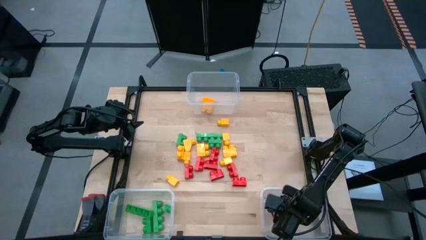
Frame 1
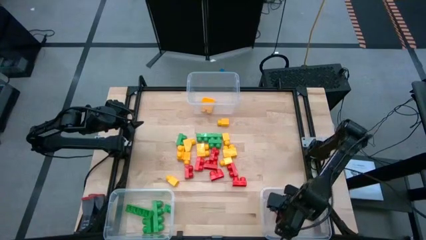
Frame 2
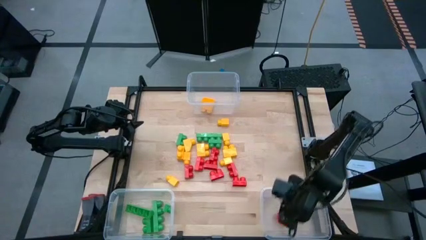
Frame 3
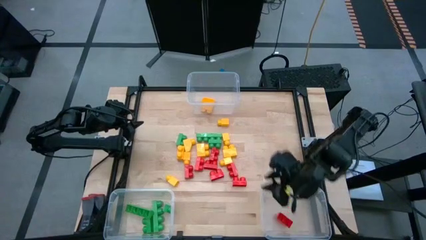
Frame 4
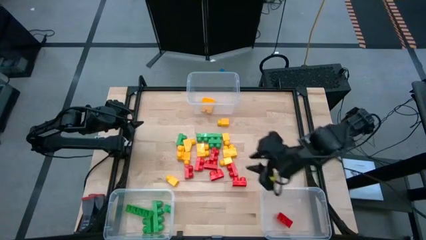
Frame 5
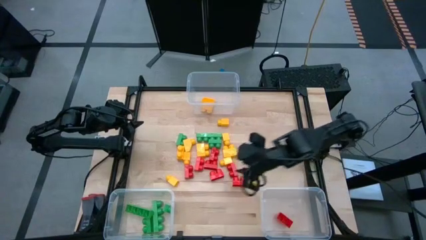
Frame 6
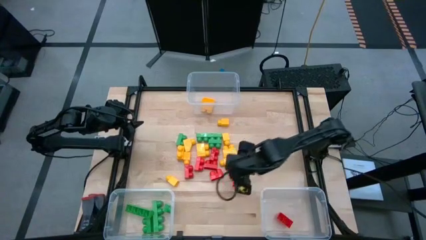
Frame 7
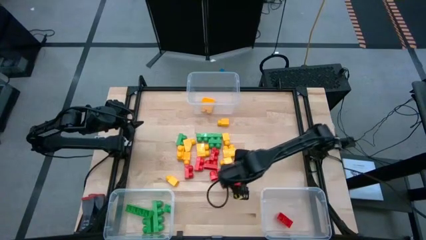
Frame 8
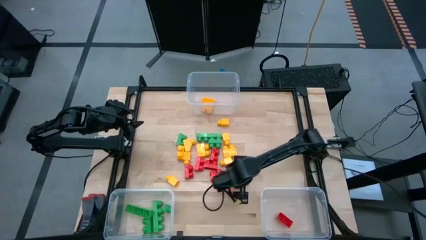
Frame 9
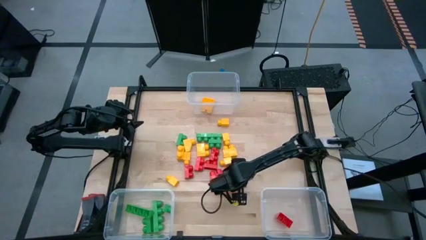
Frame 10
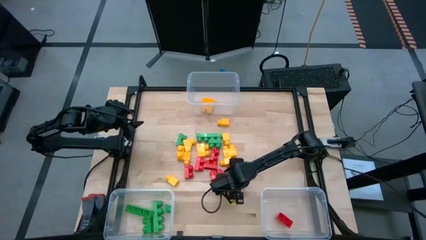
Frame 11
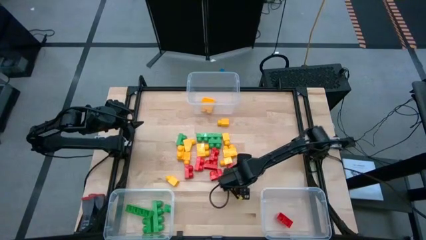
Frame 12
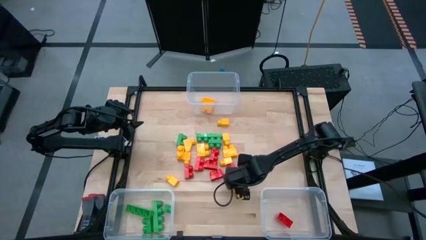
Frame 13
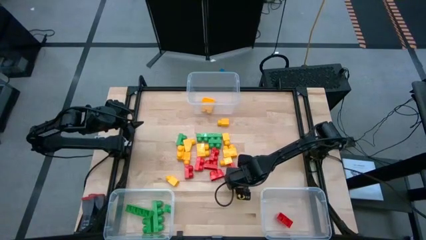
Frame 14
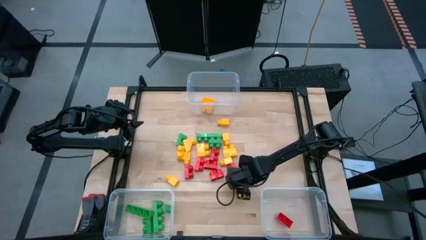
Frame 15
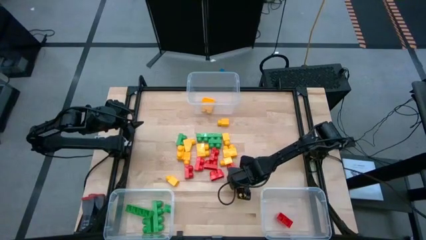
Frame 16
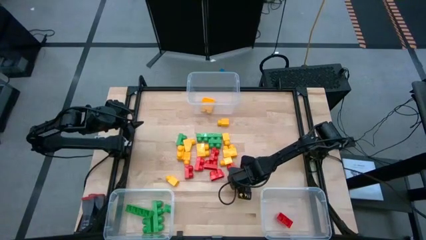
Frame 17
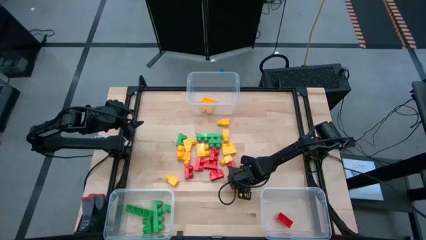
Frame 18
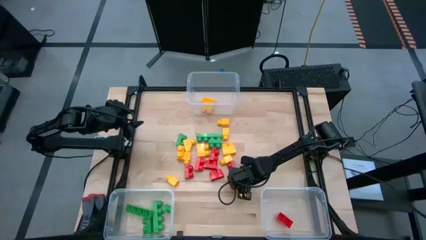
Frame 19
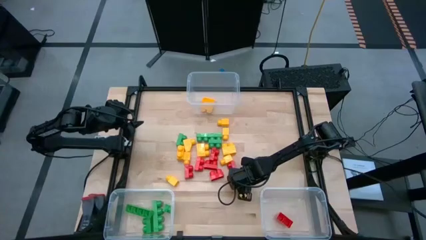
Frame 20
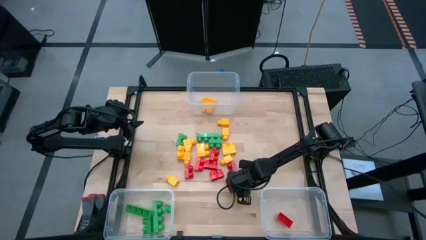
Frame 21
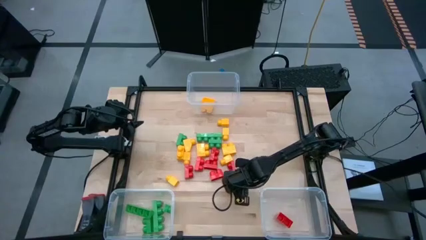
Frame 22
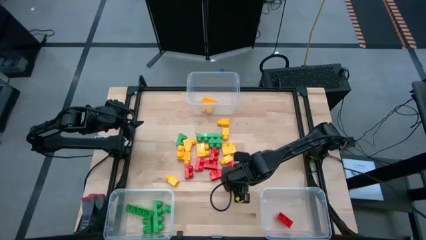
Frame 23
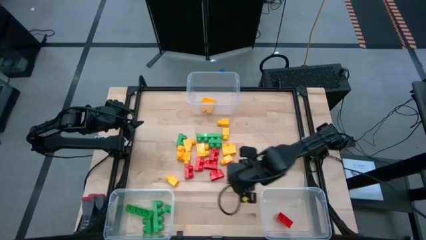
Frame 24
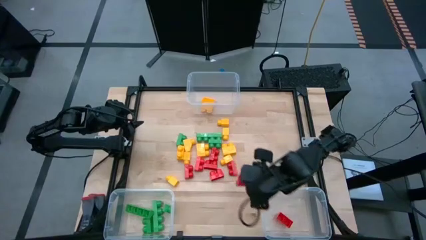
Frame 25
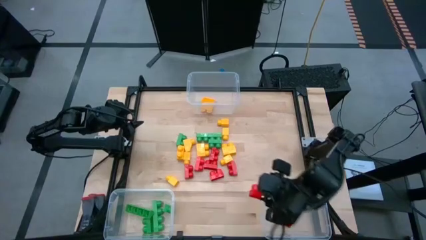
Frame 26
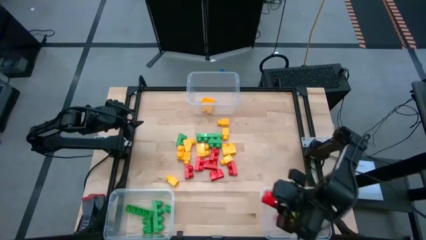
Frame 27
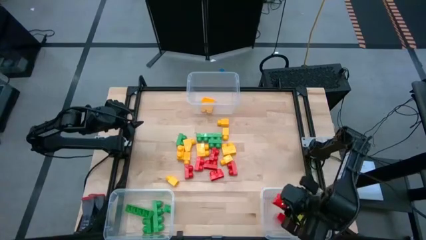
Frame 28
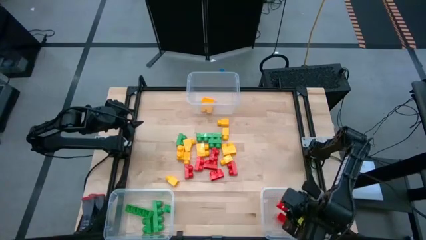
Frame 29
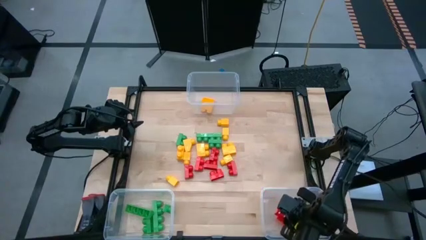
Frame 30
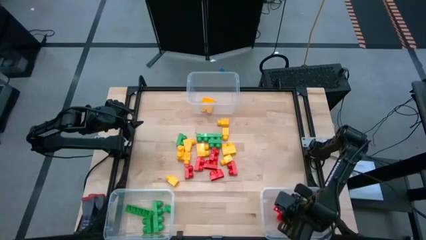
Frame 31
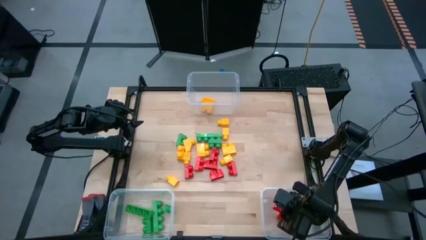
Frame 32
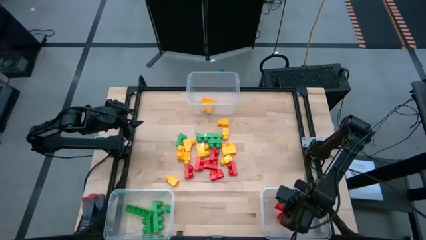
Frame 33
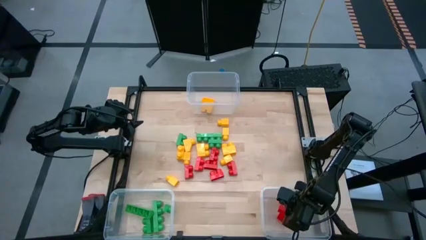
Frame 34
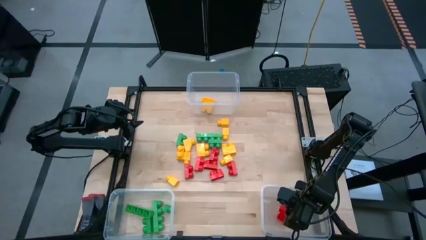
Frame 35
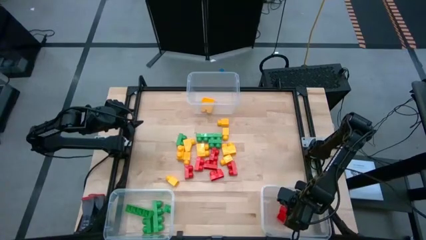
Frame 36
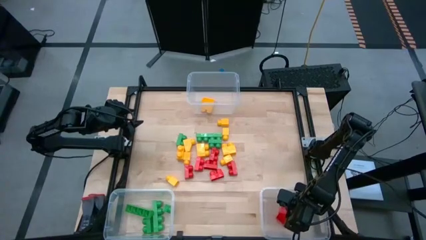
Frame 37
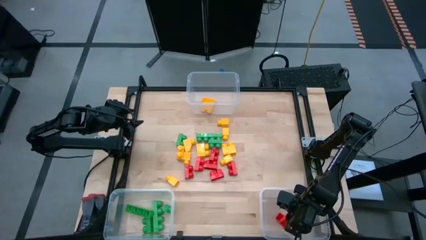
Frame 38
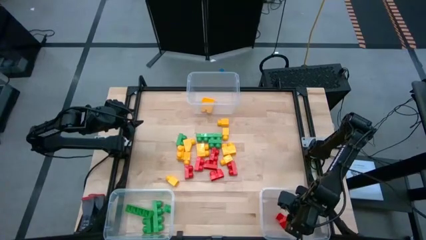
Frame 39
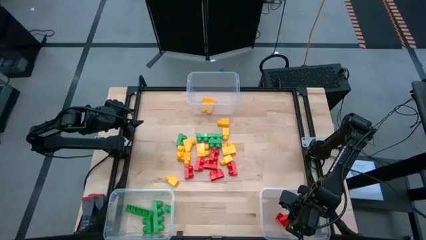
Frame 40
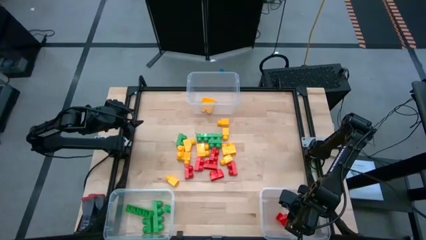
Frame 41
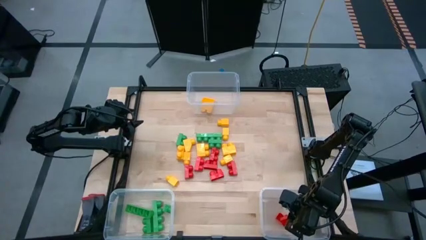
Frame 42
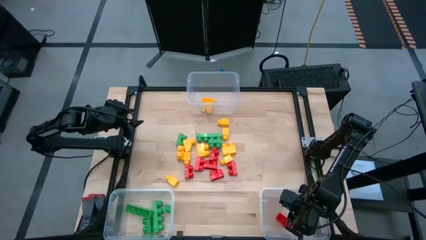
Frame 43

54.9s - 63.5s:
Task: Sort blocks
Put the red game piece into the bottom right transparent bin

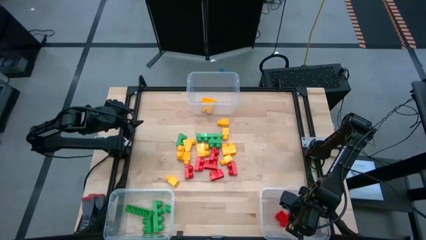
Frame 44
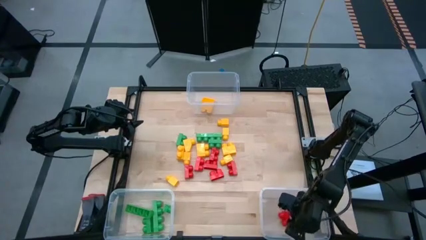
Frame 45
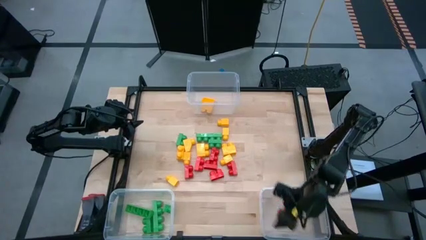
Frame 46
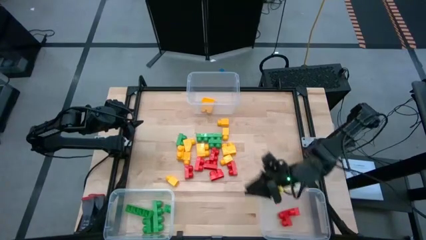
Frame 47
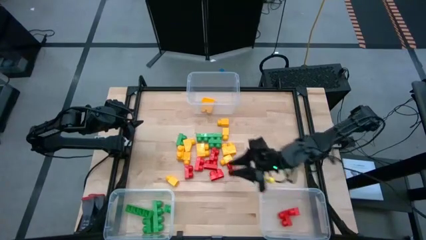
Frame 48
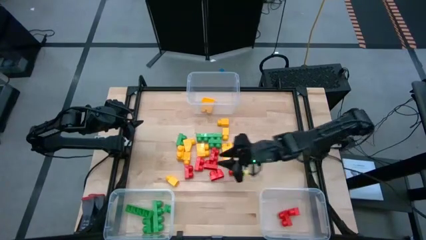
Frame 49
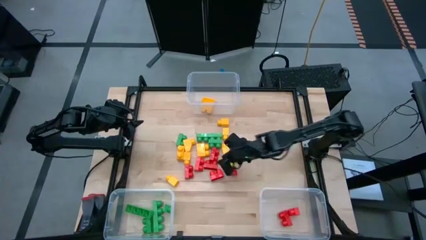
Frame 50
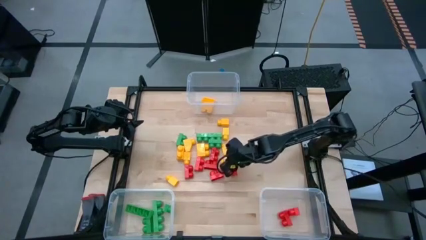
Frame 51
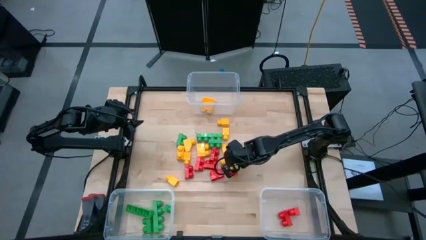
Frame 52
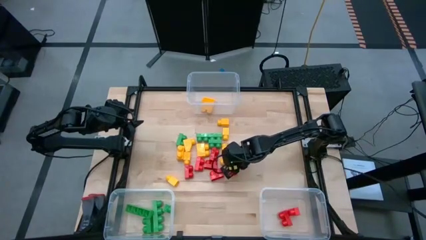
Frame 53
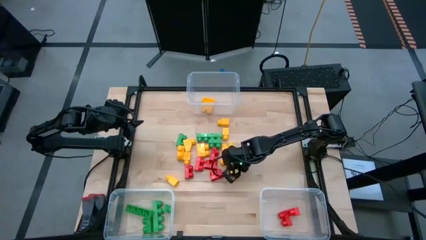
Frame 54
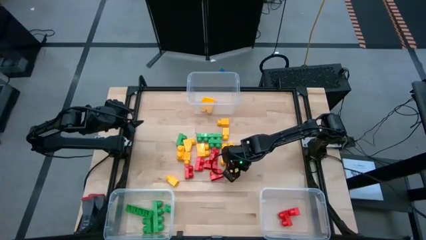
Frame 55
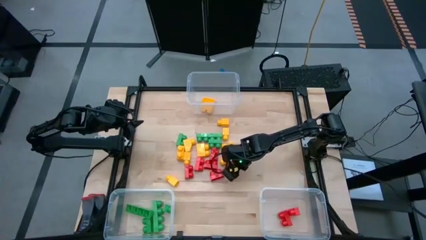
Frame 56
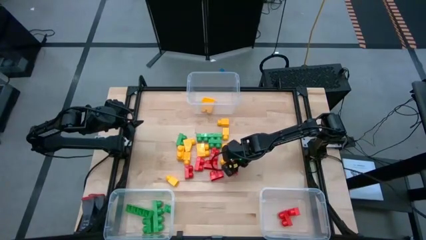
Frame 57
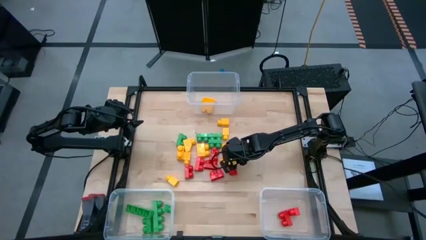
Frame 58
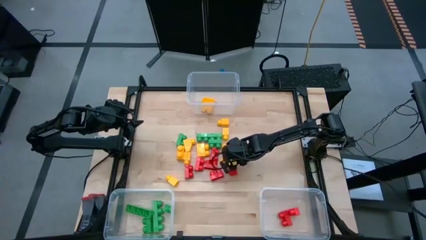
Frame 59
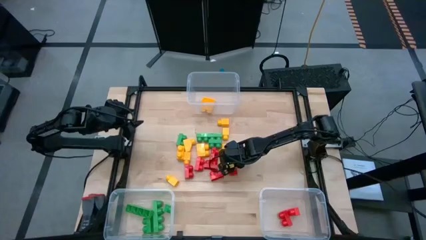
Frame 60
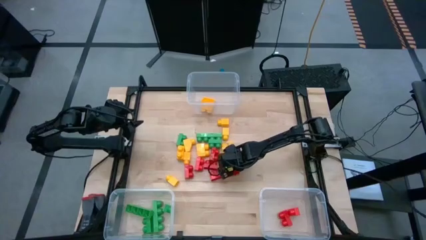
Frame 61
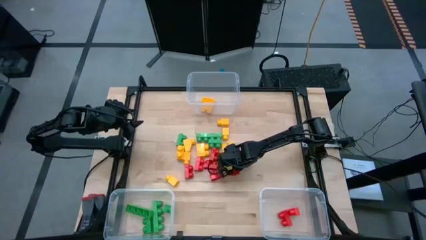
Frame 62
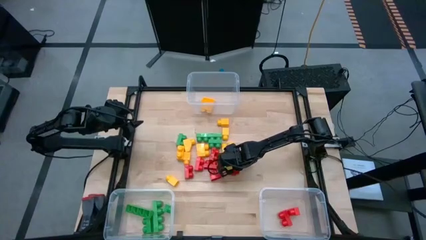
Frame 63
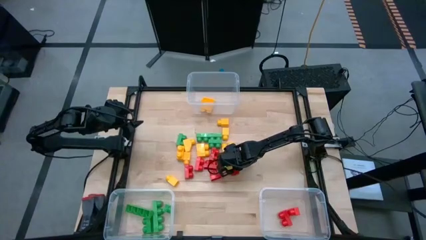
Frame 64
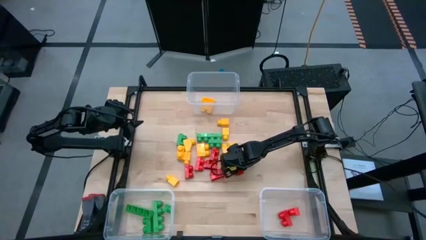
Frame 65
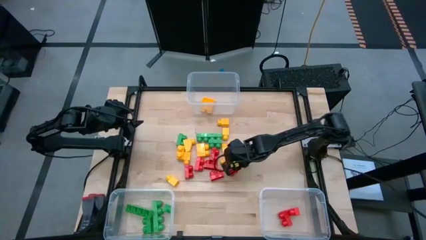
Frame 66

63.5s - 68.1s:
Put the red game piece into the bottom right transparent bin

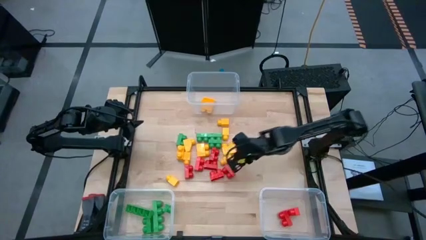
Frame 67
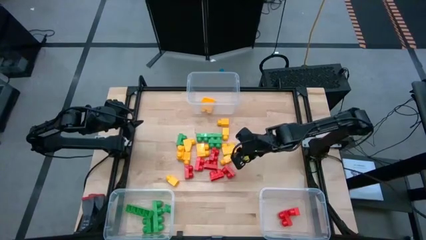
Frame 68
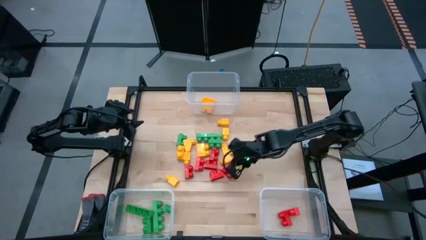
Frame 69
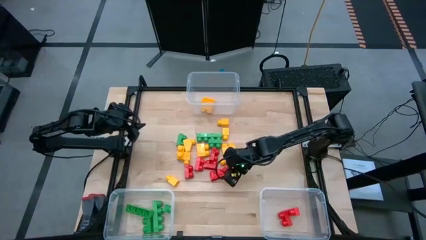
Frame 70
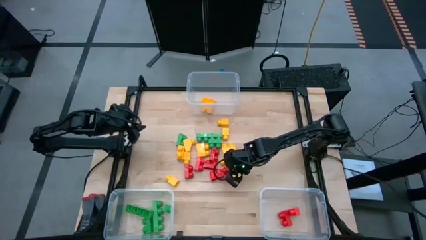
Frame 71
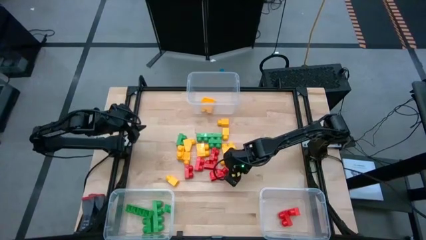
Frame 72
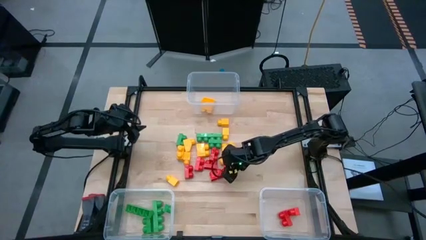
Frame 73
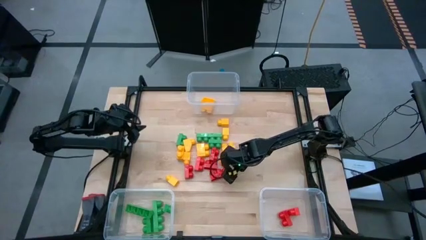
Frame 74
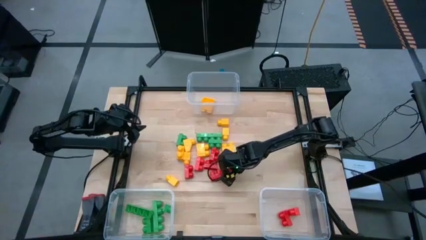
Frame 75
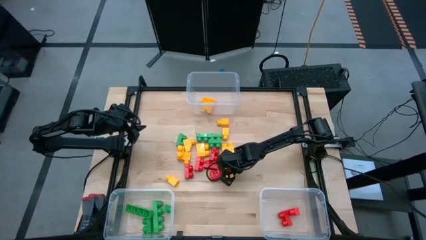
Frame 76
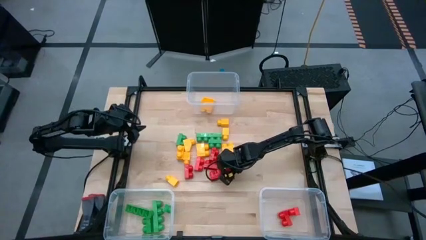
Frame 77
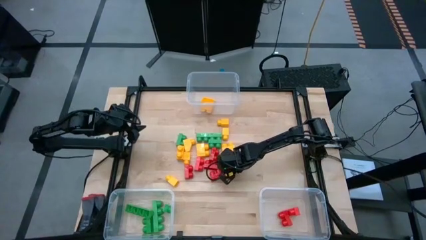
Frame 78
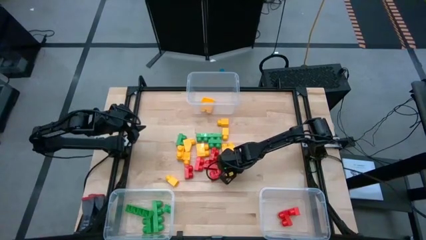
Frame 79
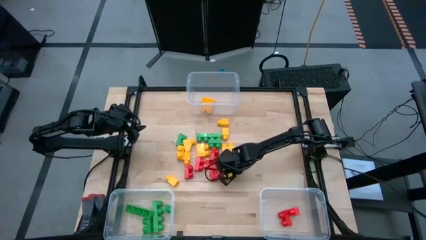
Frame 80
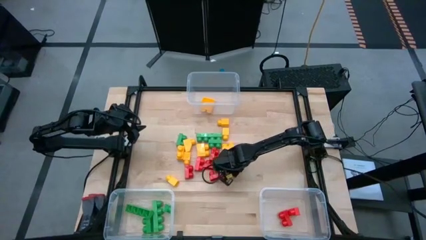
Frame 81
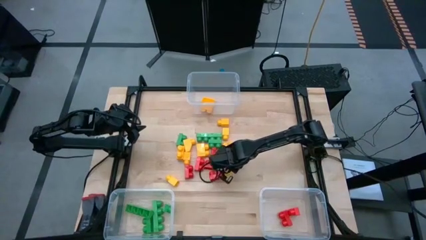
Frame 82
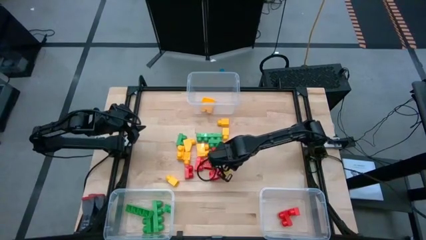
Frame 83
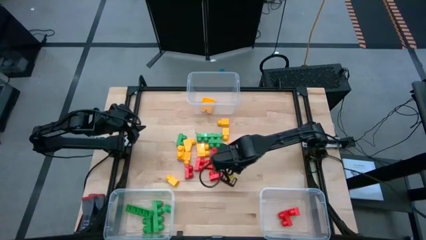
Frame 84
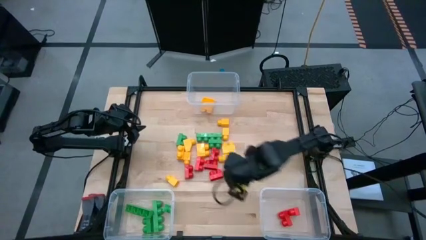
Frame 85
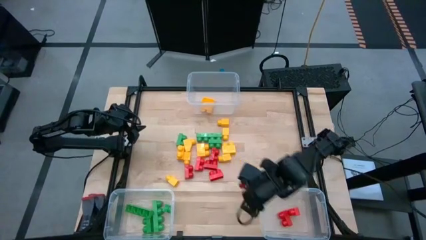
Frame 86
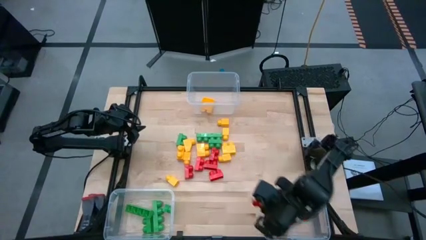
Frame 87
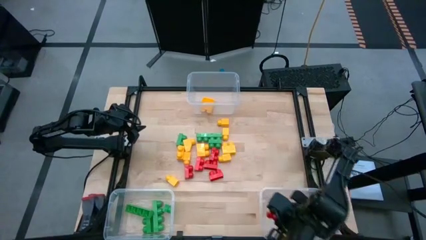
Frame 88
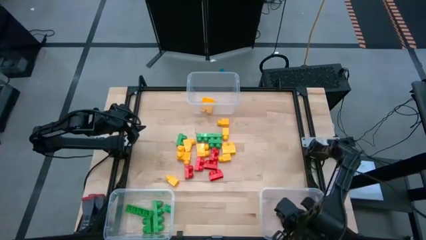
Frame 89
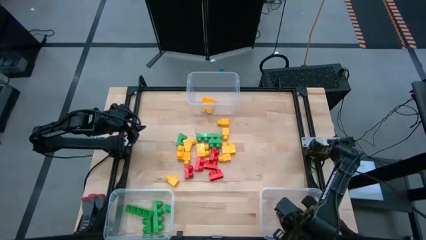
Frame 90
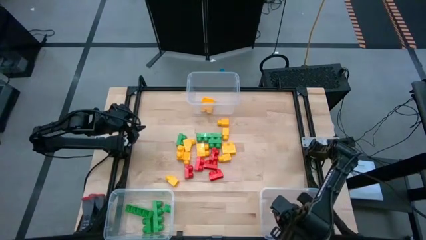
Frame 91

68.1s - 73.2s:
Put the red game piece into the bottom right transparent bin
